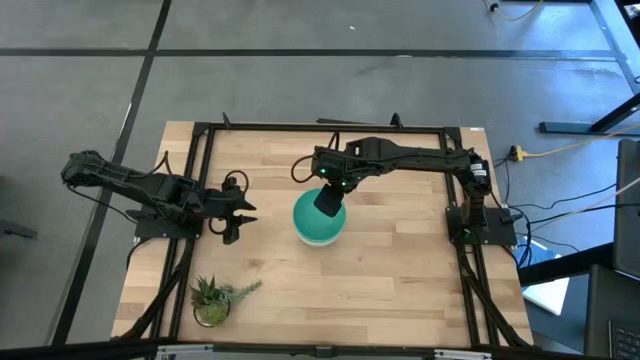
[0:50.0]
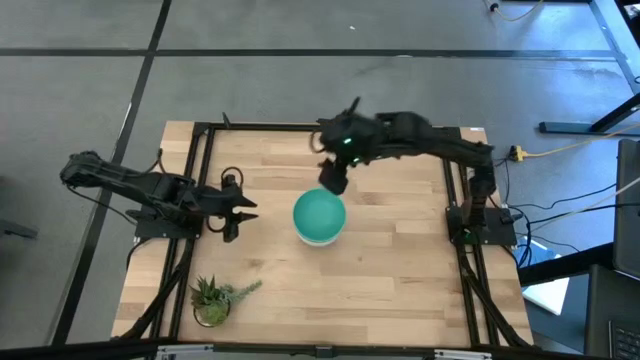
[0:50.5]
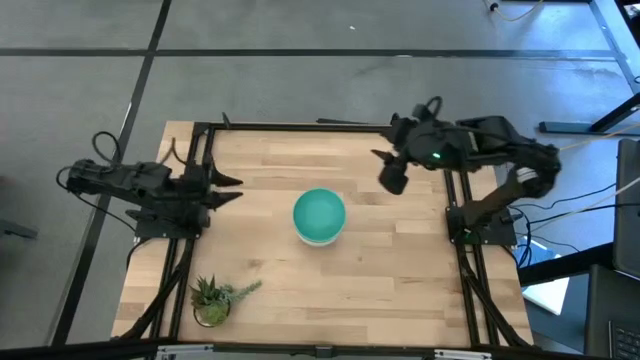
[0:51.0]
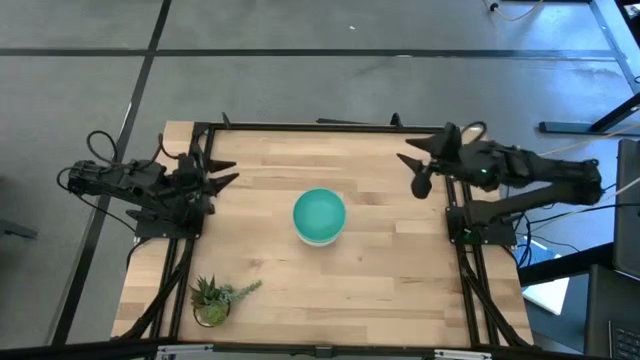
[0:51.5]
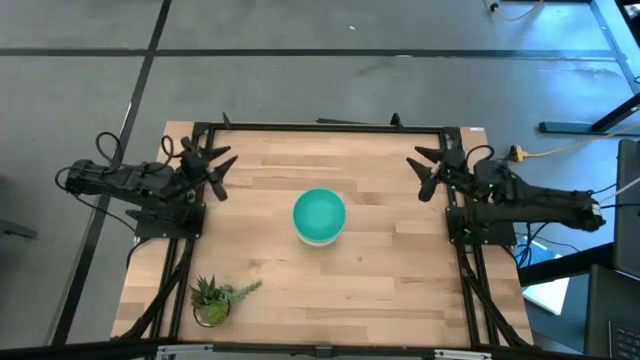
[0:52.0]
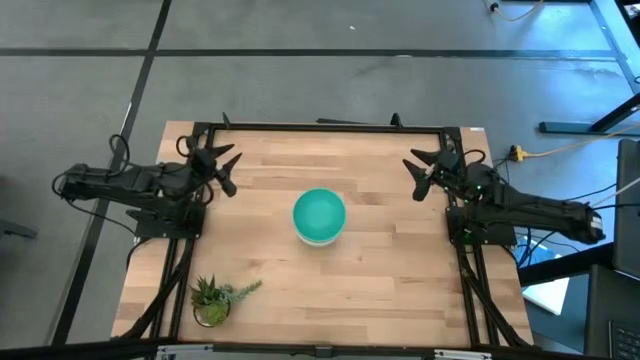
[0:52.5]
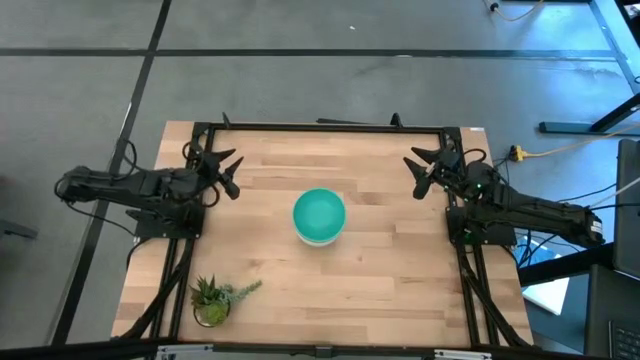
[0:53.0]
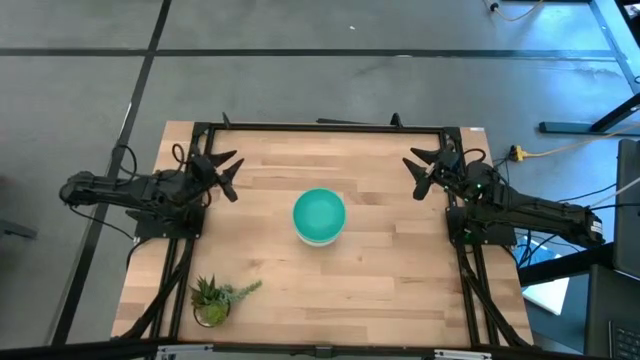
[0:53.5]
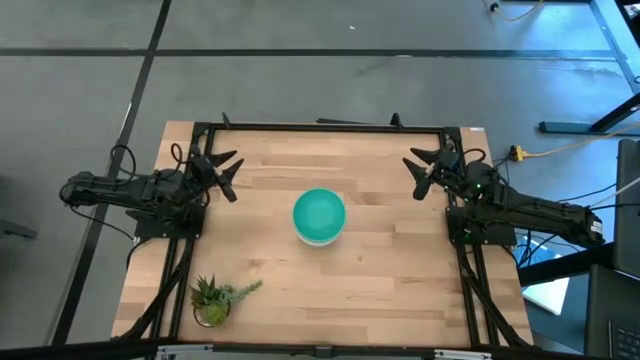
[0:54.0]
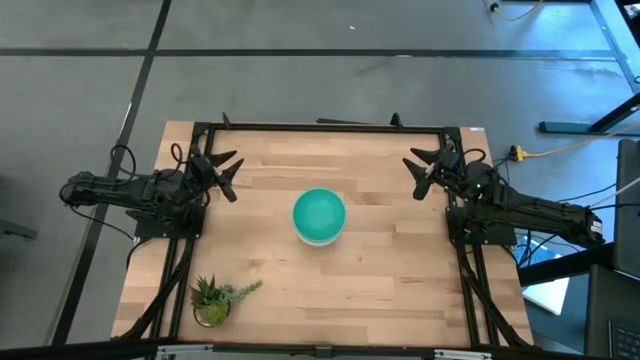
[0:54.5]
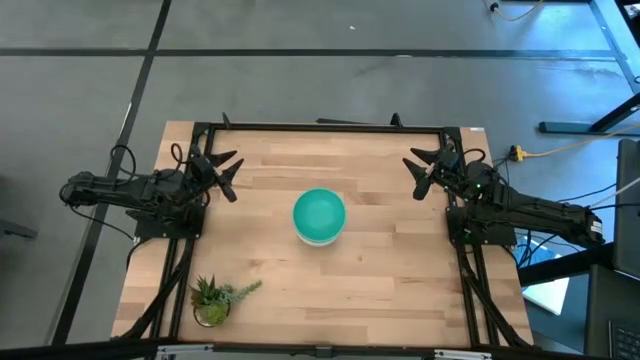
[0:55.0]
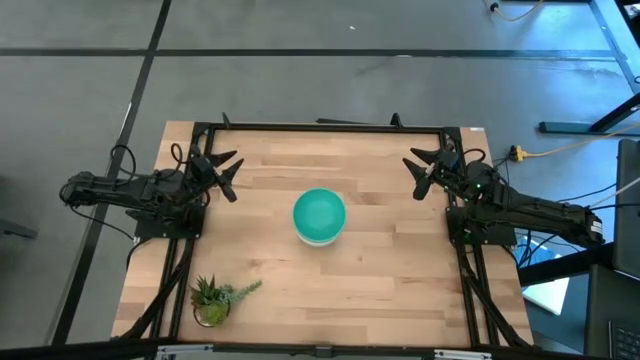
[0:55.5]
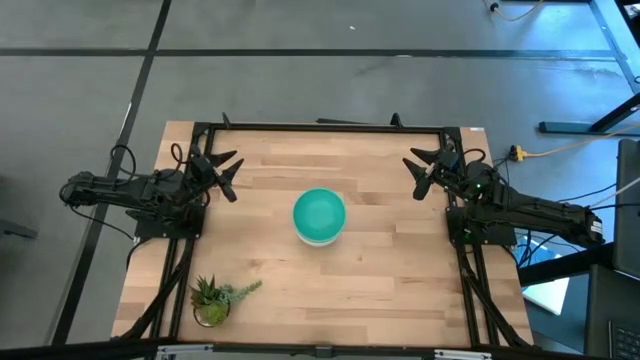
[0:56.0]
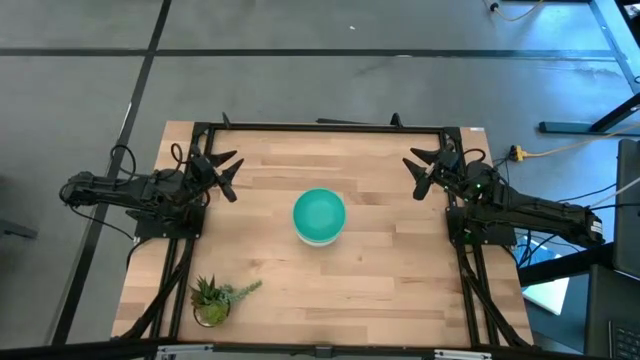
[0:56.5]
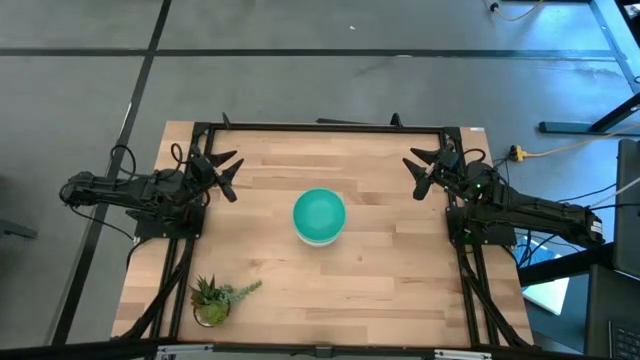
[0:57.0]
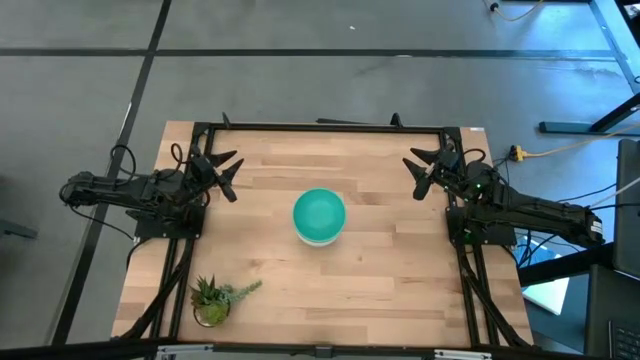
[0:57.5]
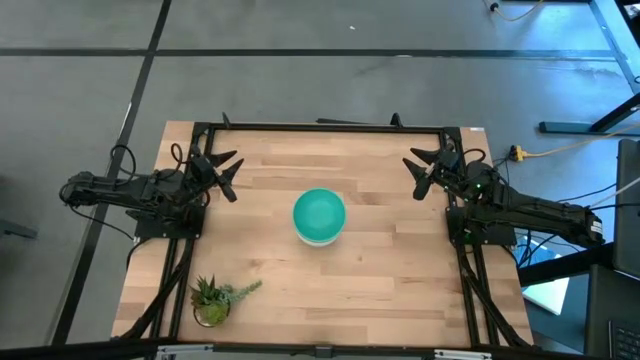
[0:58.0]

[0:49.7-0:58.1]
Task: Nest bowls inside each other
Return to Home Position

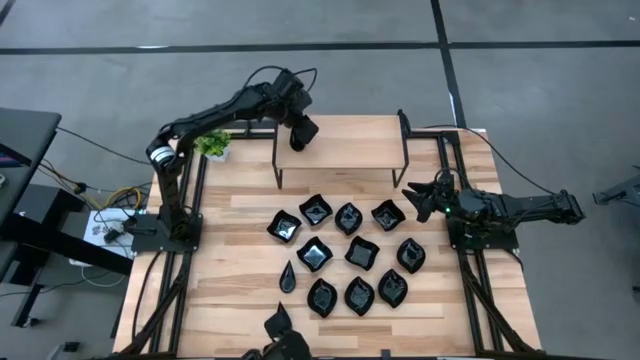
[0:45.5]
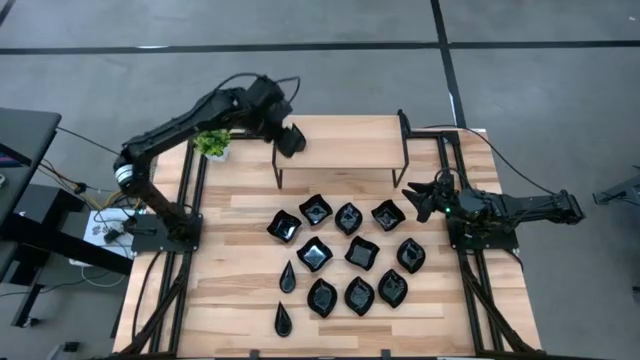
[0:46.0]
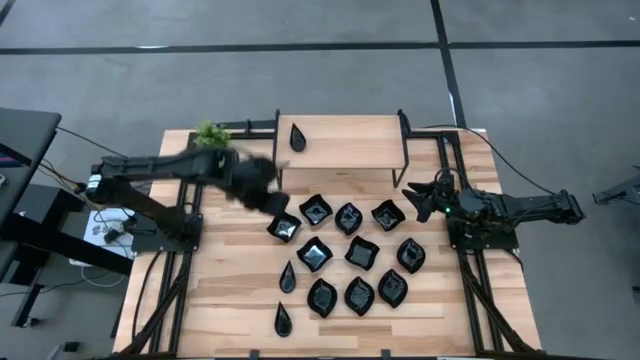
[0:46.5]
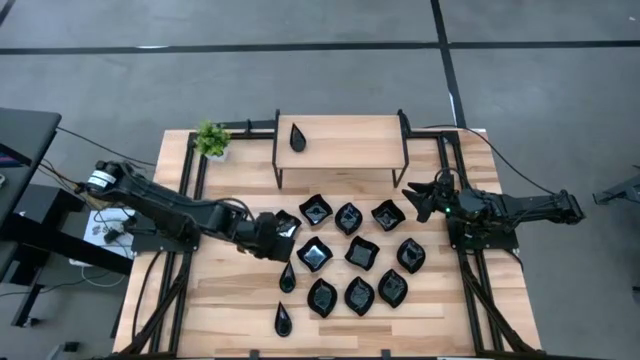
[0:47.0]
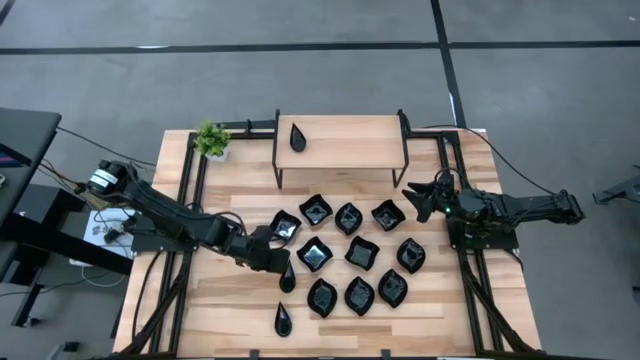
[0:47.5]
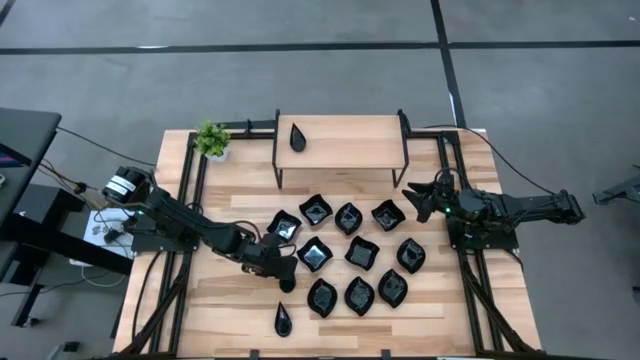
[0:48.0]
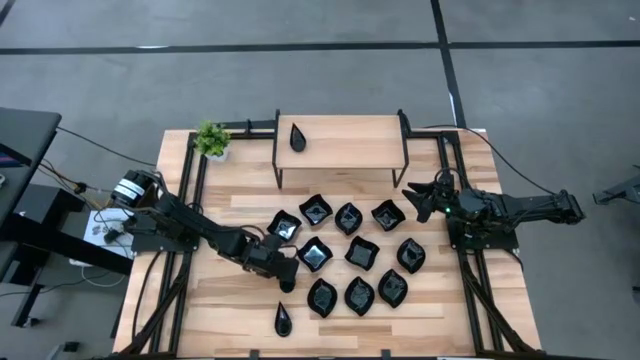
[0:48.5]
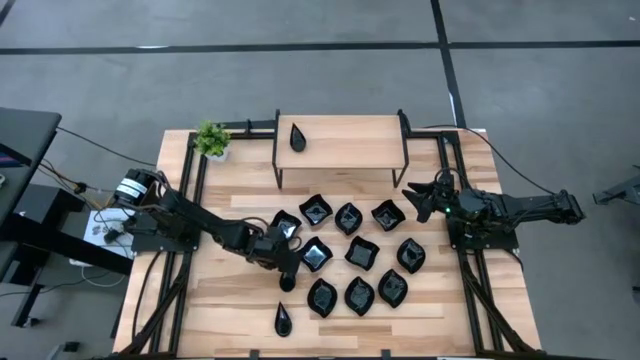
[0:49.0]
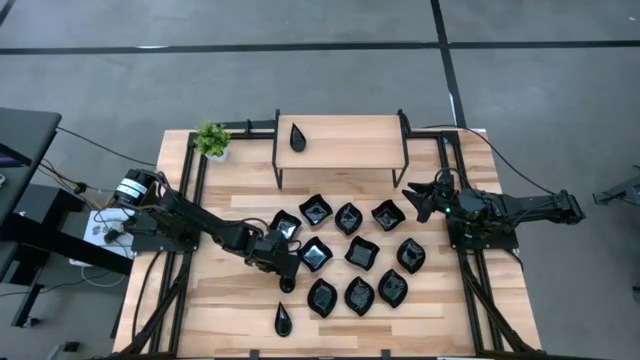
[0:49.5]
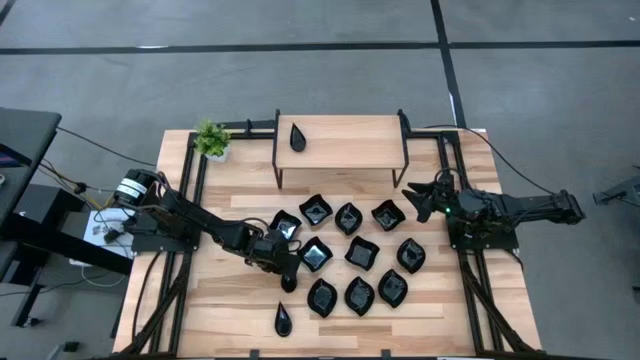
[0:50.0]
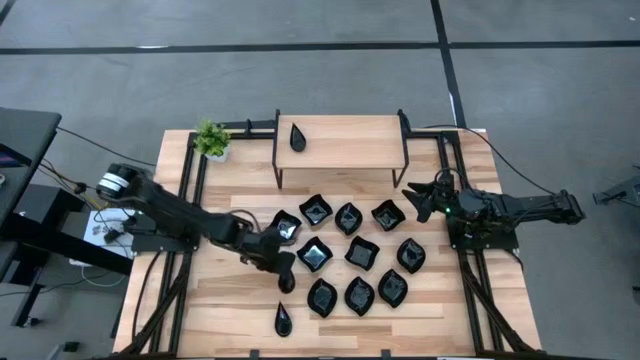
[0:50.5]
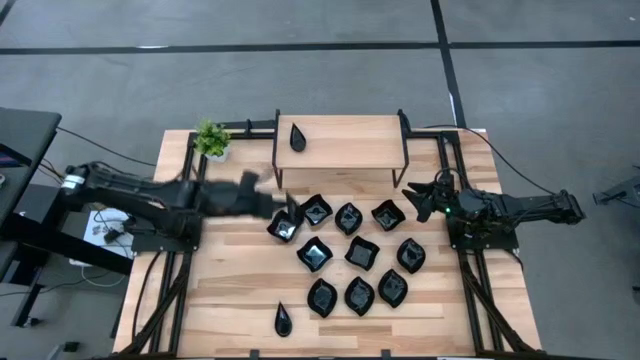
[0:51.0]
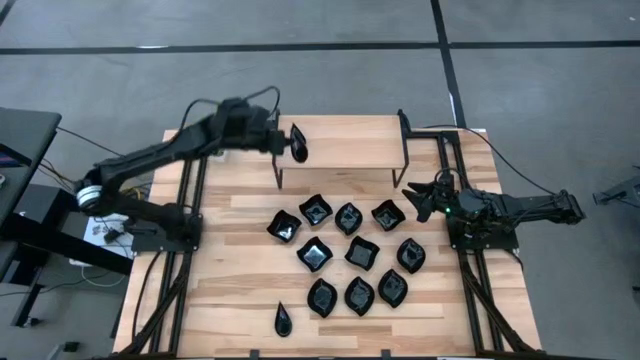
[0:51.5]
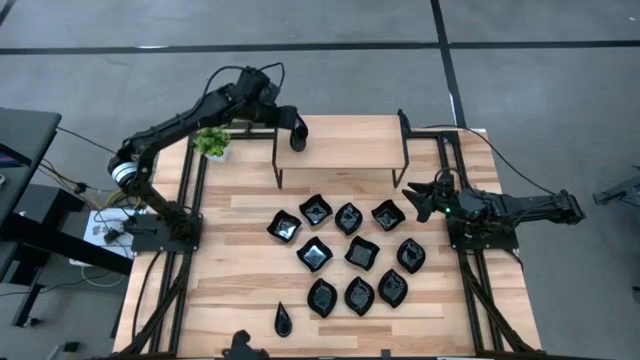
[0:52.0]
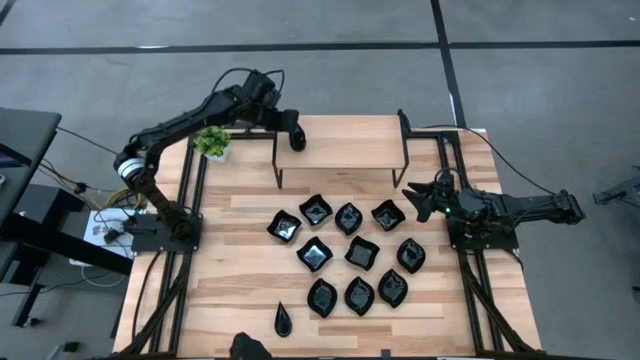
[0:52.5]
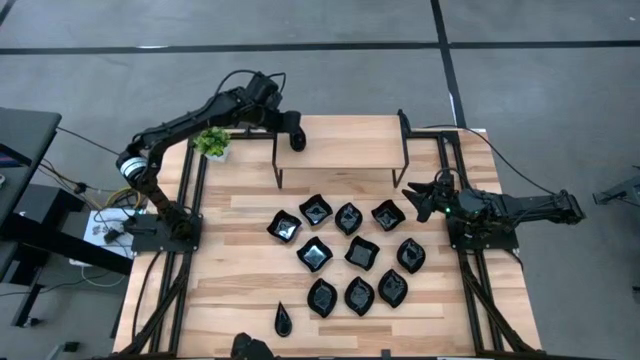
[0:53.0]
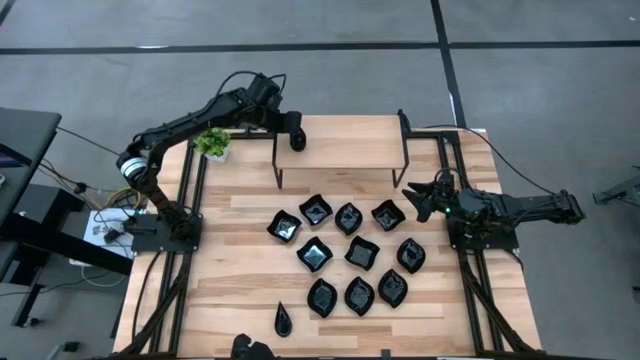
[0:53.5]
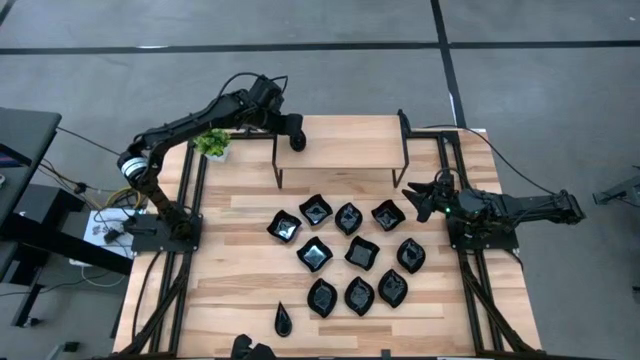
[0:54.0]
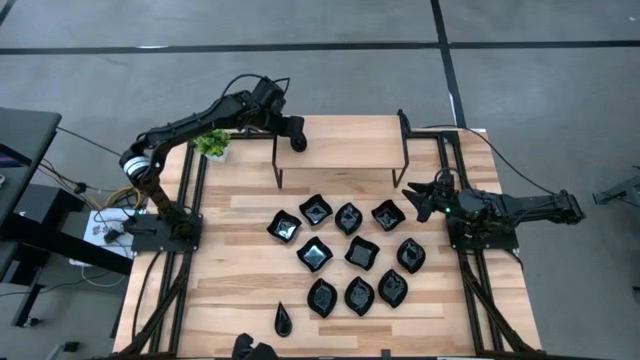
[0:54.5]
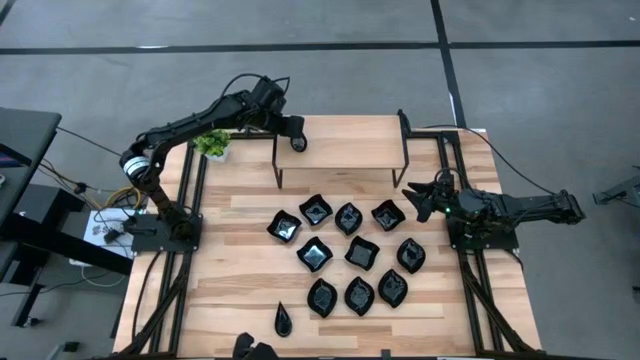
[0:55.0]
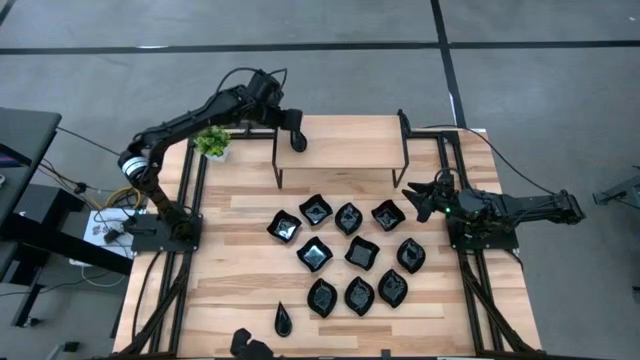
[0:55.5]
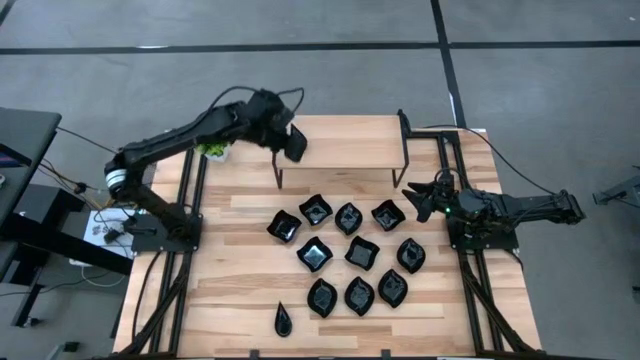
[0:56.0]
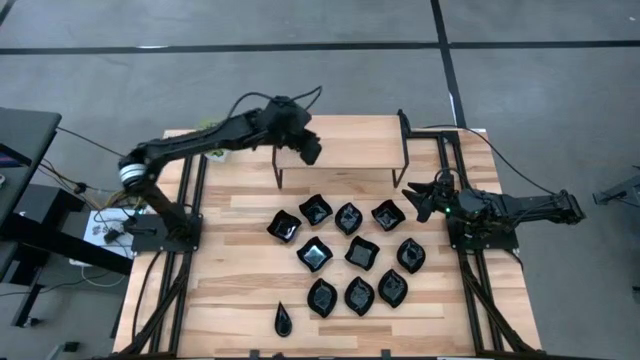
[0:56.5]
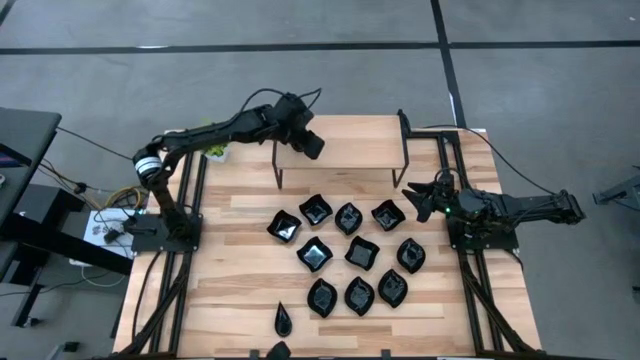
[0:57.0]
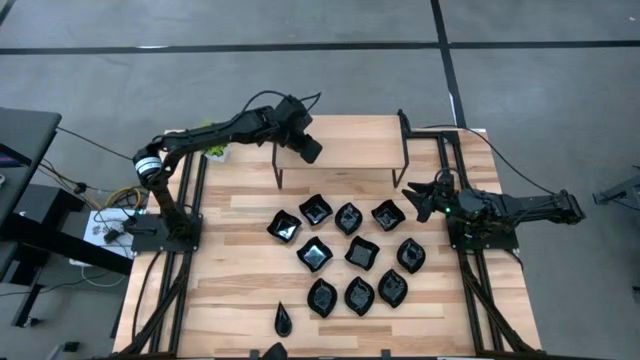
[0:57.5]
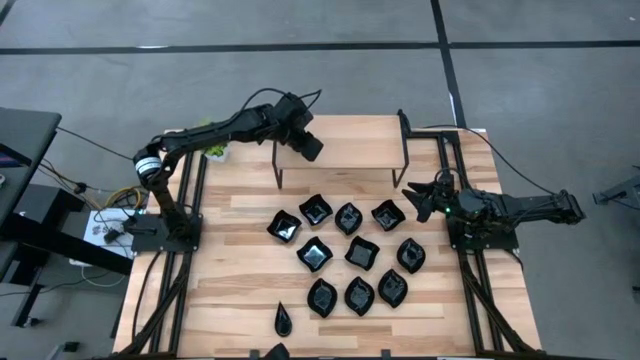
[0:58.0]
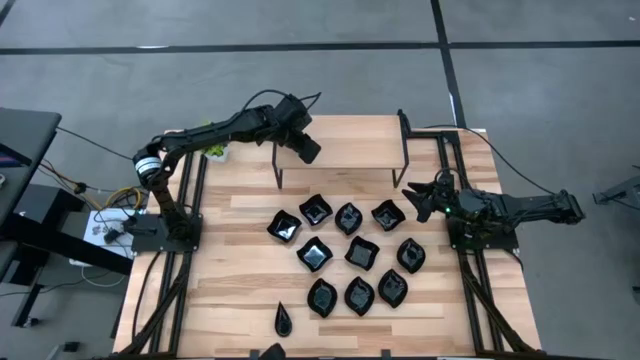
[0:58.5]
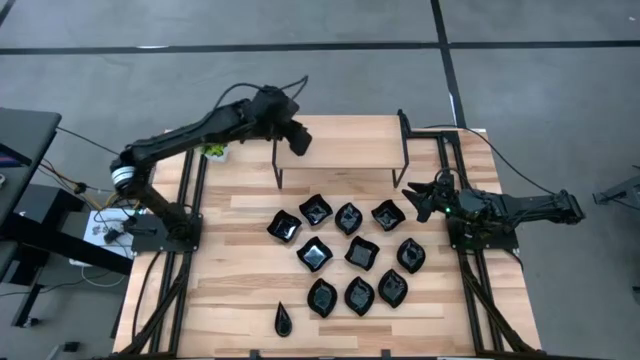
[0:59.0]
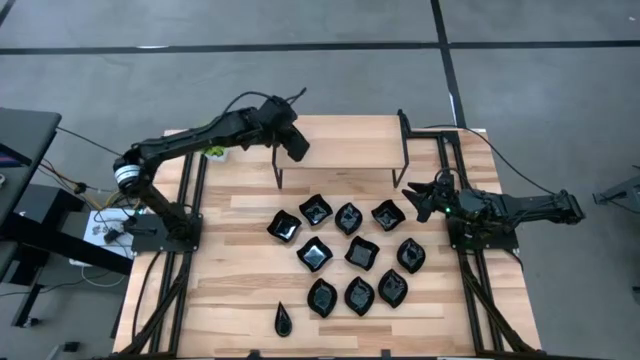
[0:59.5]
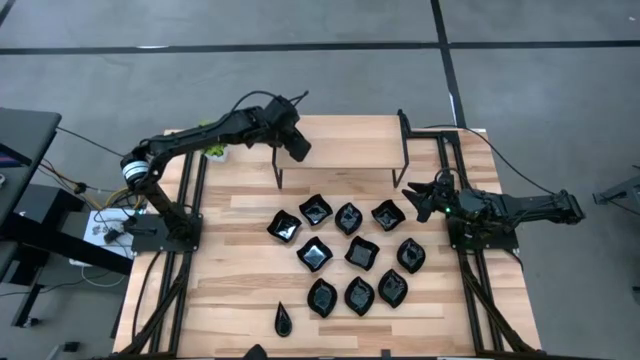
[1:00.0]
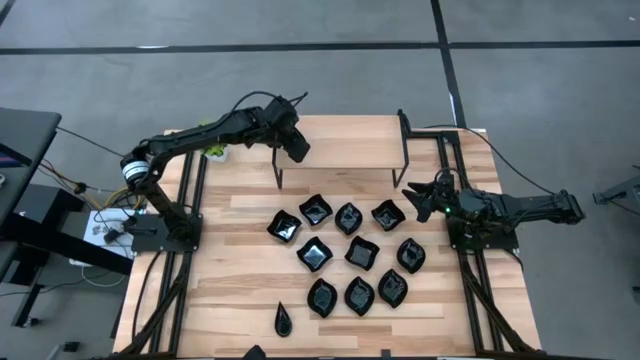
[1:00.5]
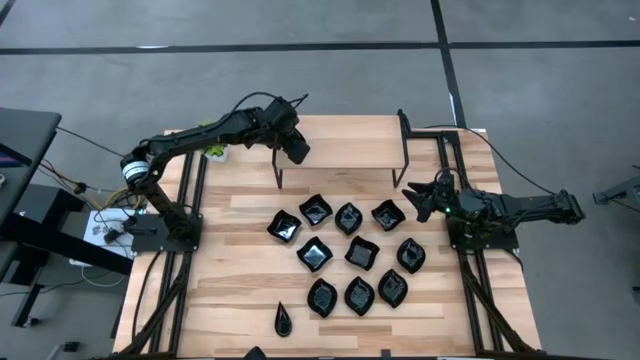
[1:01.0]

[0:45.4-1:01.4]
Task: Pick & Place Mini shaped plates
Stack the drop shaped plate on top of the drop shaped plates on the shelf
